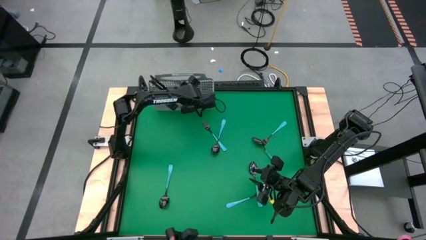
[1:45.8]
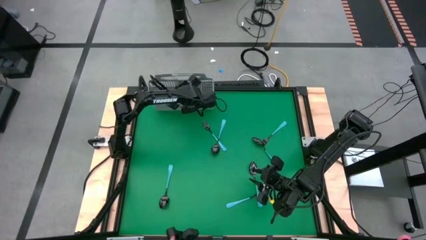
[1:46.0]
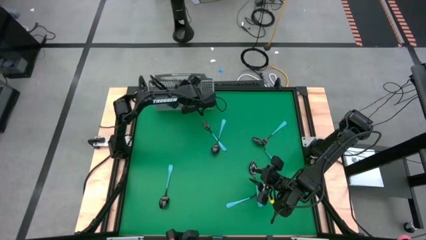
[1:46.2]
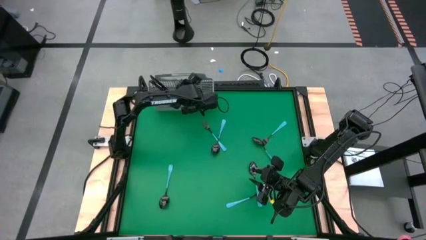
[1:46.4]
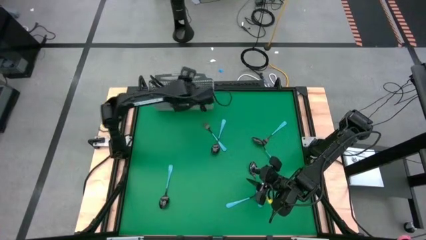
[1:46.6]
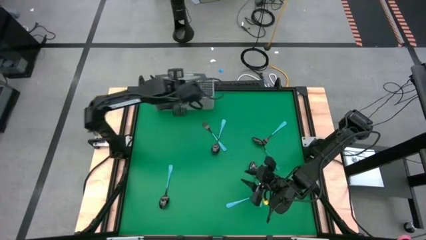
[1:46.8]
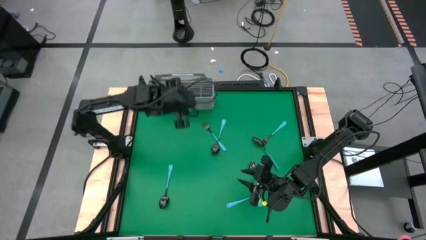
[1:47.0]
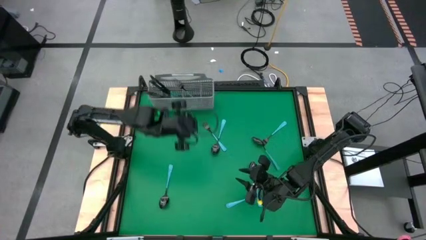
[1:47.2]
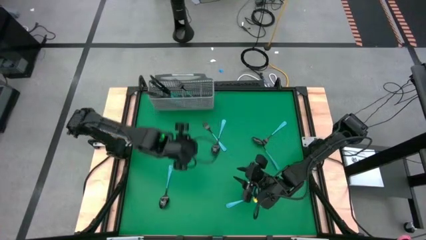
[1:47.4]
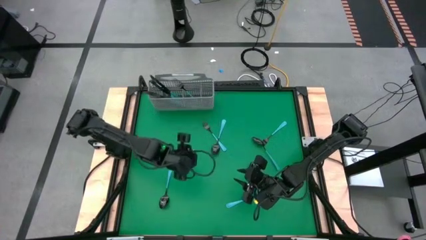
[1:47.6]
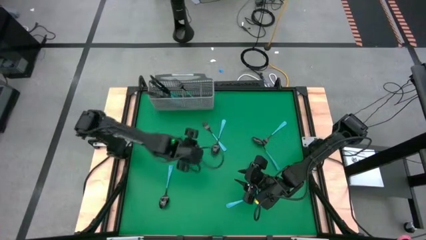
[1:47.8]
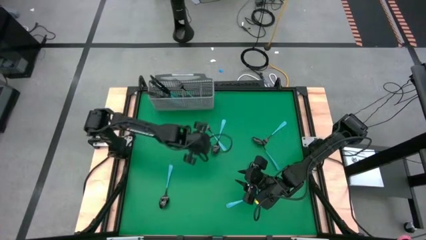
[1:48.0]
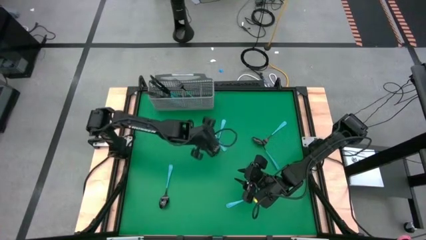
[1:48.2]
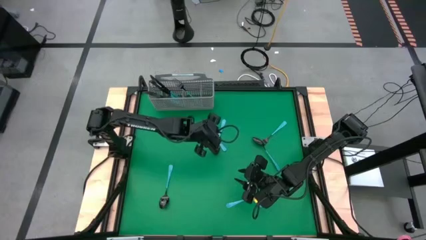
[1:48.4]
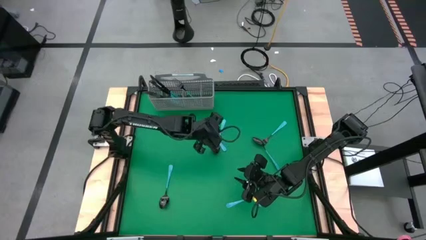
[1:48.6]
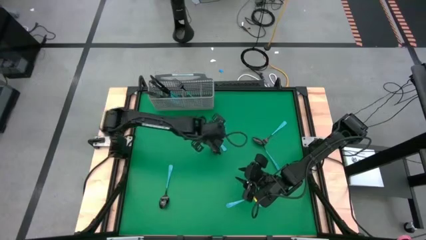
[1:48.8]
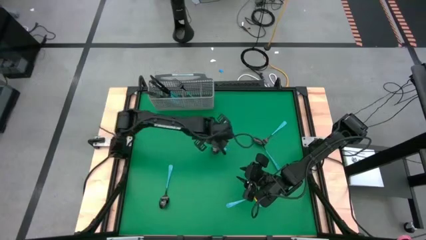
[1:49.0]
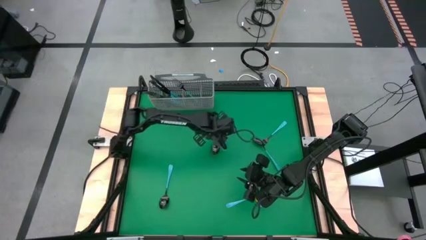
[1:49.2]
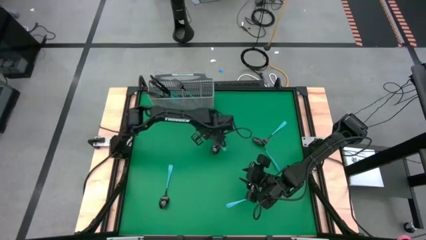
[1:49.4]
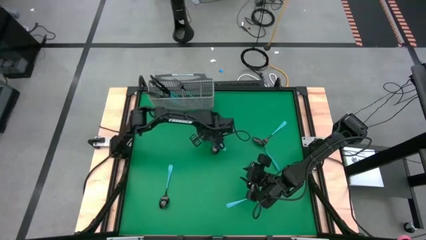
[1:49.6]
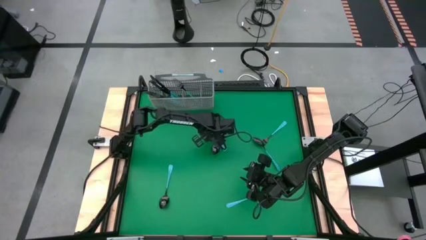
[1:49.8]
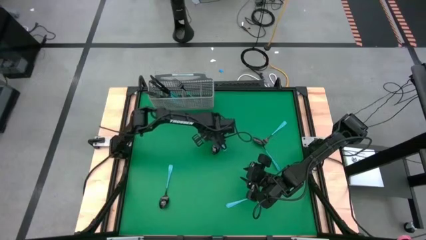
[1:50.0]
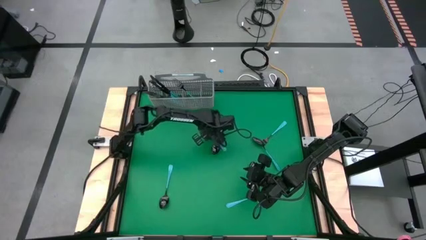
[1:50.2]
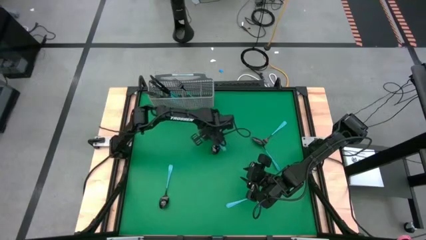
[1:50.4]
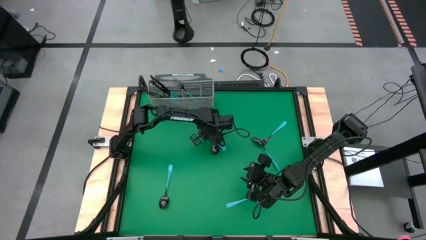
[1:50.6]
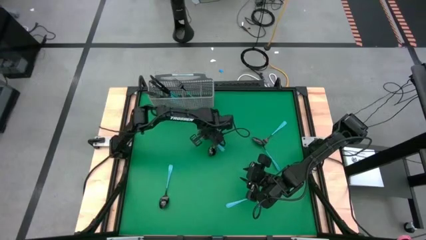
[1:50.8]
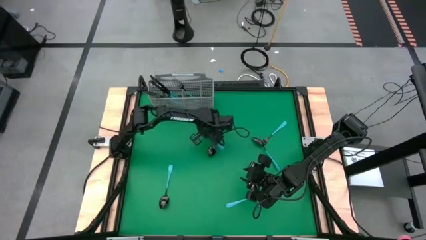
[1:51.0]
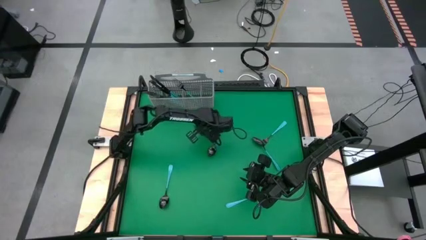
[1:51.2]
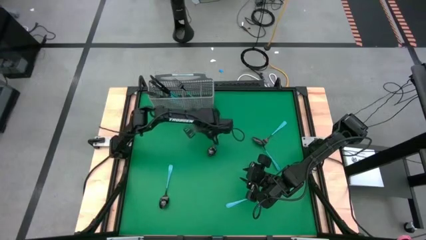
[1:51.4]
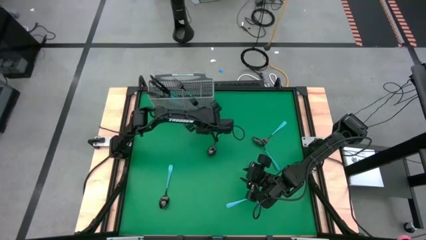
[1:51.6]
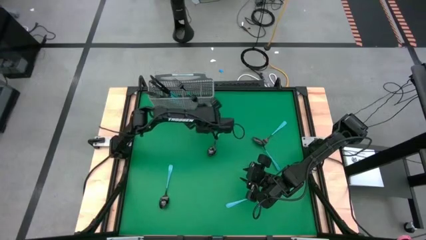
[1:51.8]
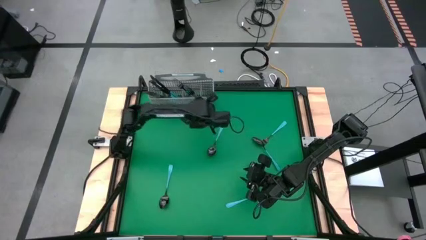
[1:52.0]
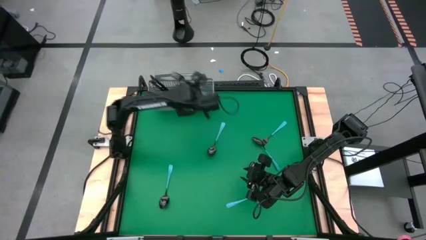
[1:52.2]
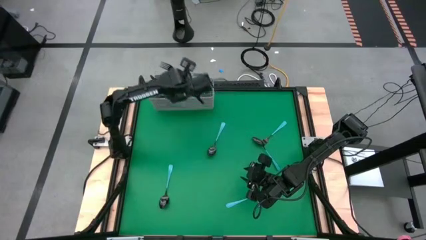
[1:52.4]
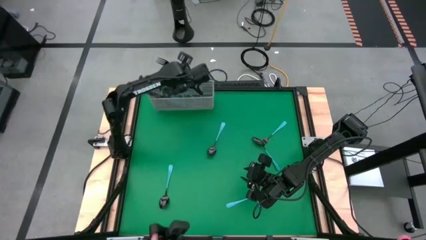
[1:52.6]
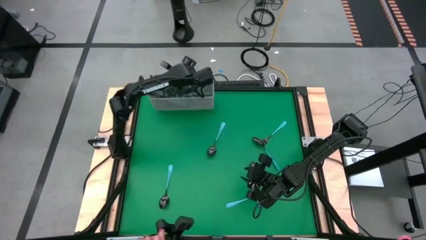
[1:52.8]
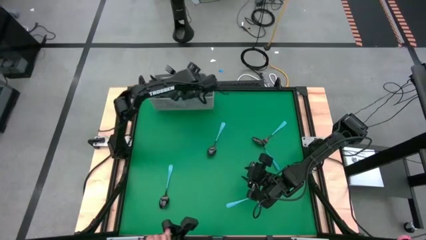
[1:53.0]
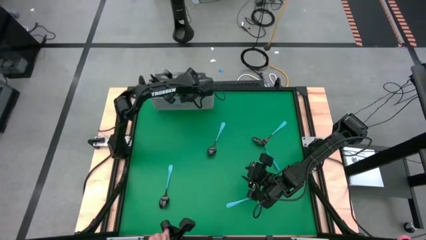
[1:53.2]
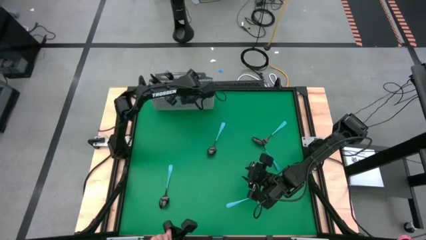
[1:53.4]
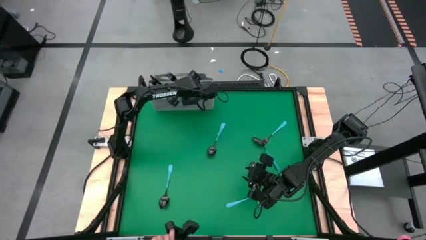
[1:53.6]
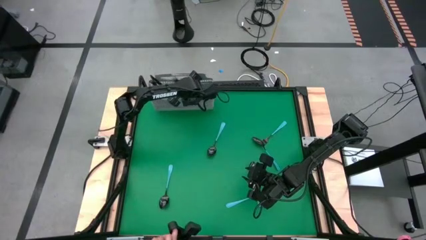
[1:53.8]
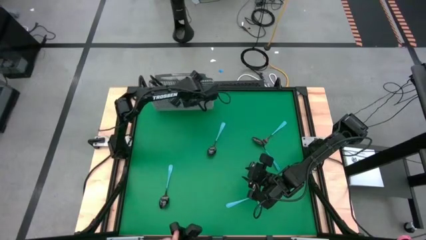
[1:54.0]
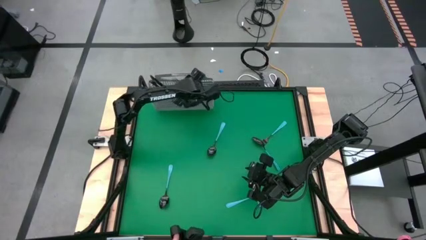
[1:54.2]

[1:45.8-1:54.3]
Task: Sort silverware
Put the fork into the silverware rack

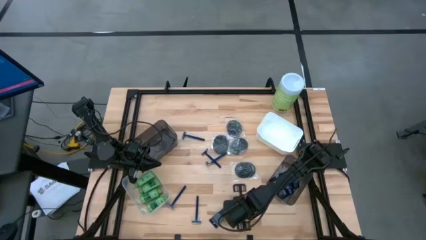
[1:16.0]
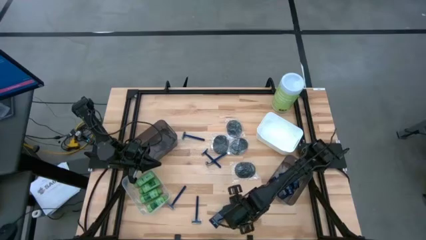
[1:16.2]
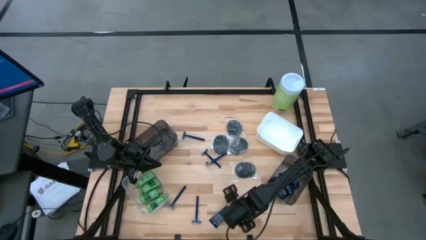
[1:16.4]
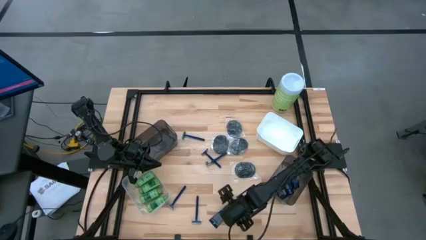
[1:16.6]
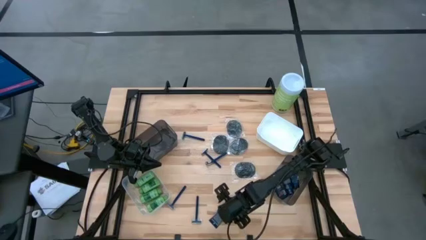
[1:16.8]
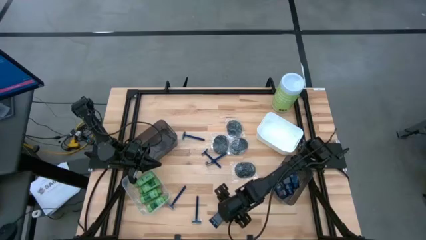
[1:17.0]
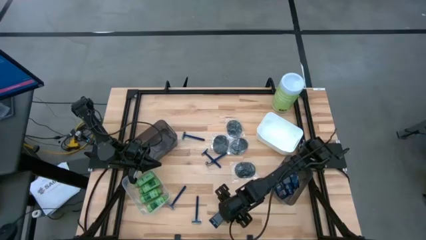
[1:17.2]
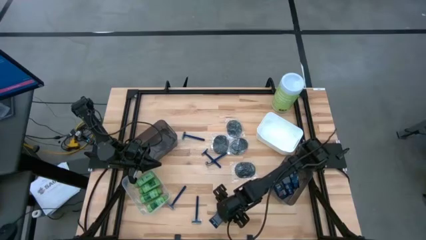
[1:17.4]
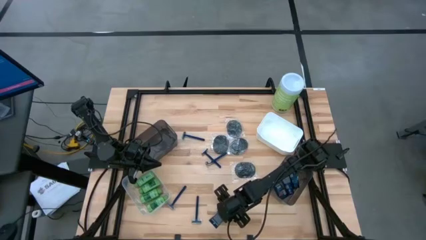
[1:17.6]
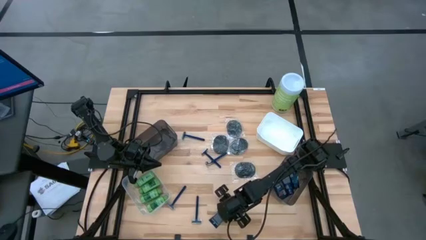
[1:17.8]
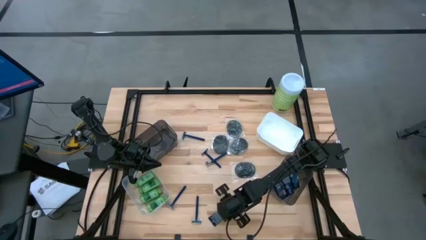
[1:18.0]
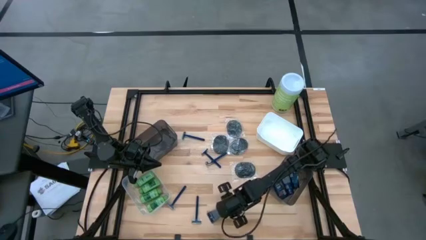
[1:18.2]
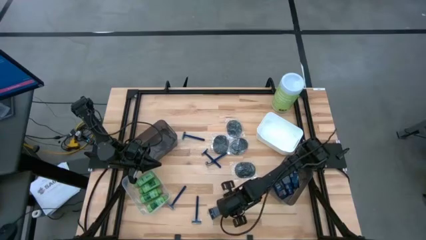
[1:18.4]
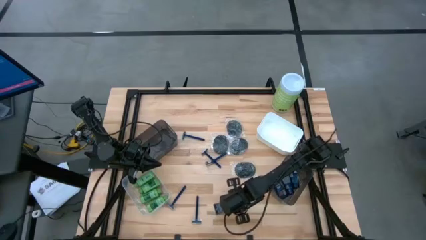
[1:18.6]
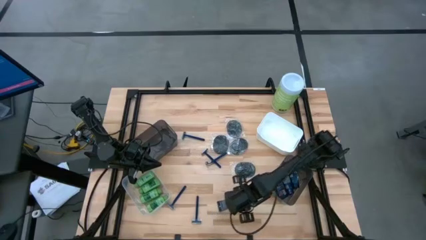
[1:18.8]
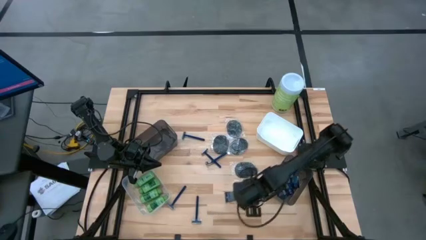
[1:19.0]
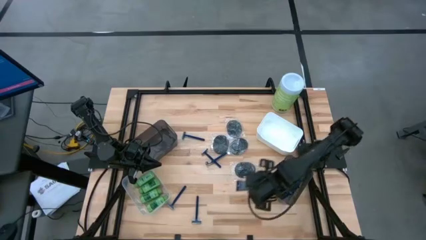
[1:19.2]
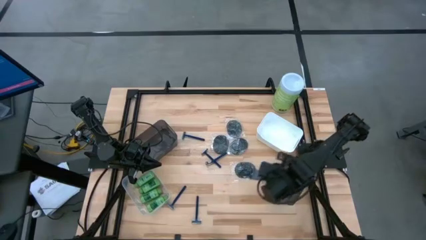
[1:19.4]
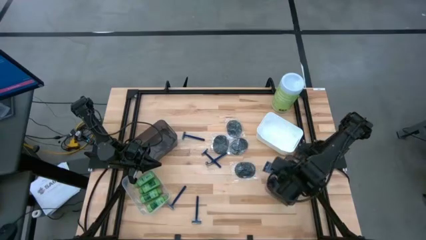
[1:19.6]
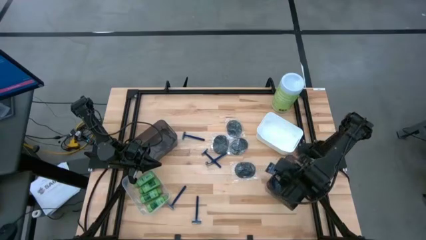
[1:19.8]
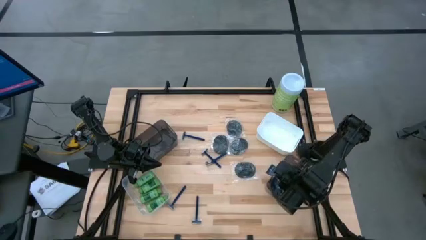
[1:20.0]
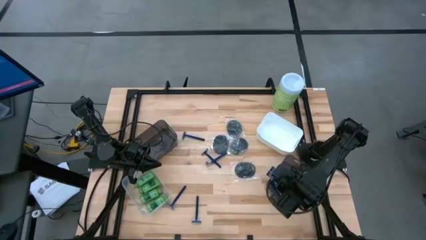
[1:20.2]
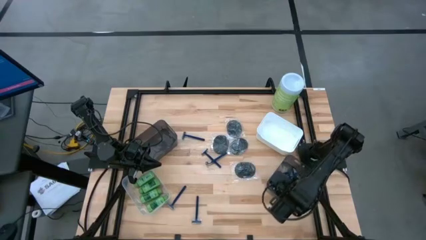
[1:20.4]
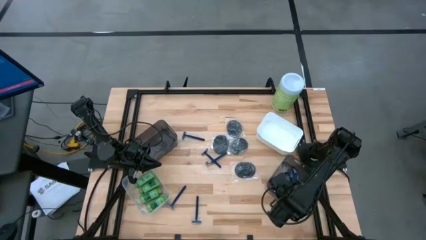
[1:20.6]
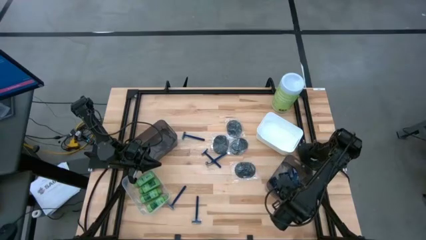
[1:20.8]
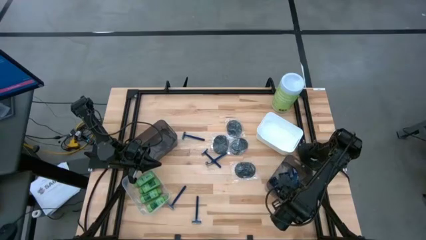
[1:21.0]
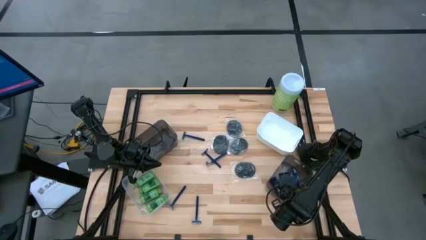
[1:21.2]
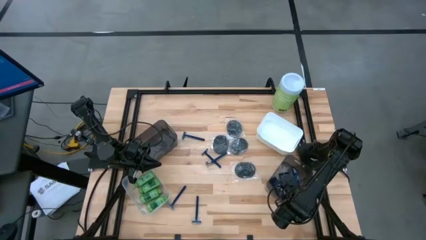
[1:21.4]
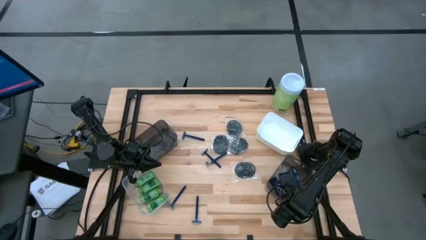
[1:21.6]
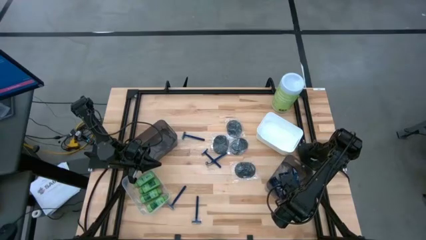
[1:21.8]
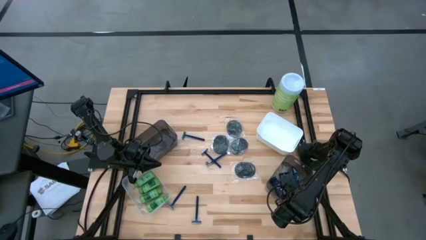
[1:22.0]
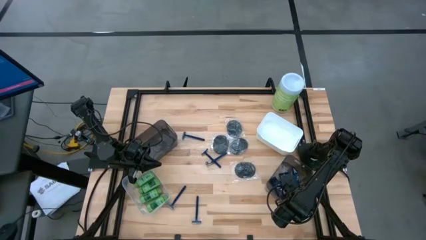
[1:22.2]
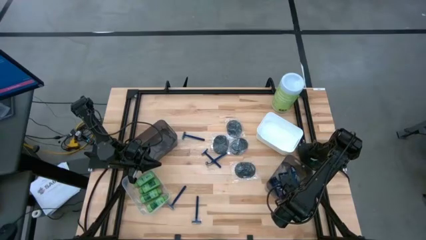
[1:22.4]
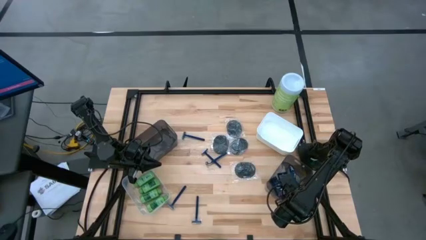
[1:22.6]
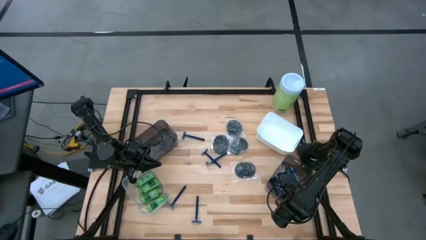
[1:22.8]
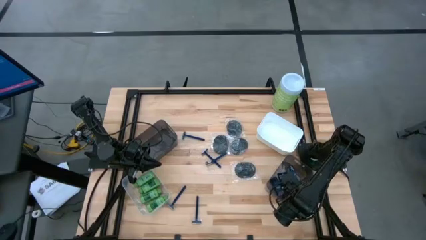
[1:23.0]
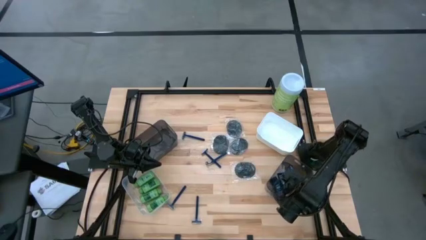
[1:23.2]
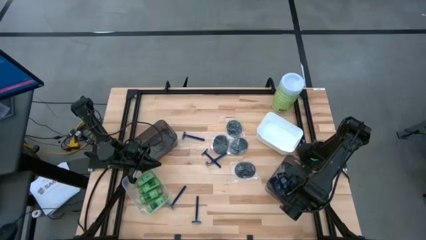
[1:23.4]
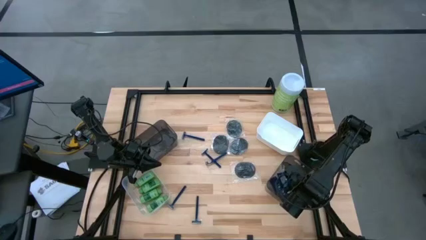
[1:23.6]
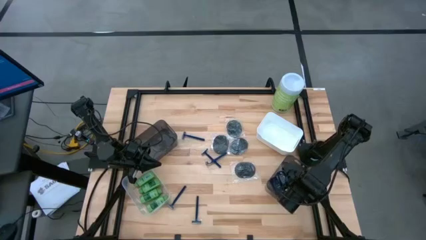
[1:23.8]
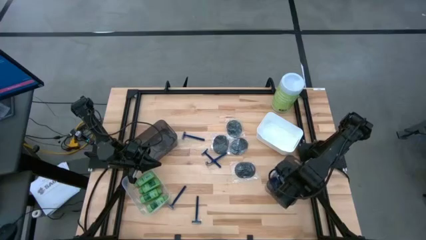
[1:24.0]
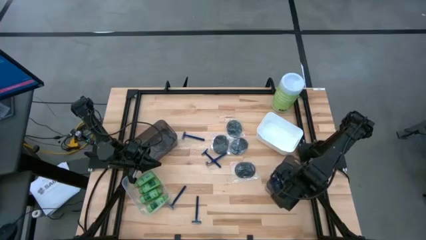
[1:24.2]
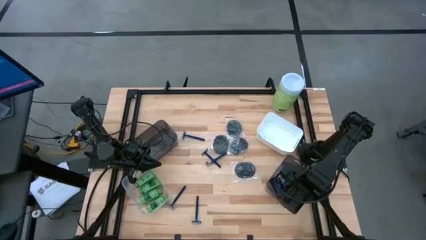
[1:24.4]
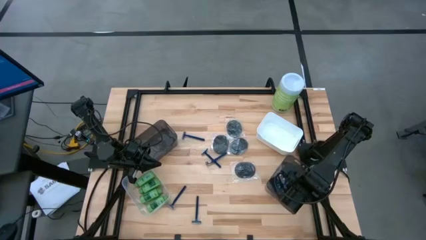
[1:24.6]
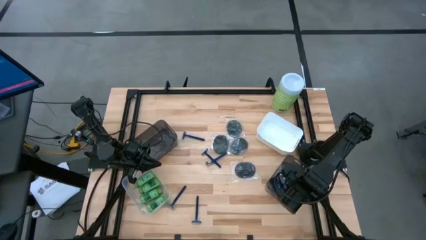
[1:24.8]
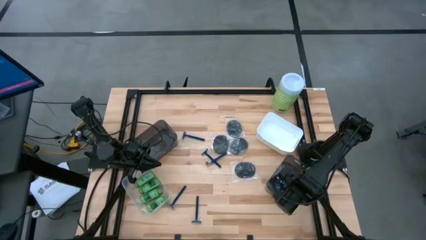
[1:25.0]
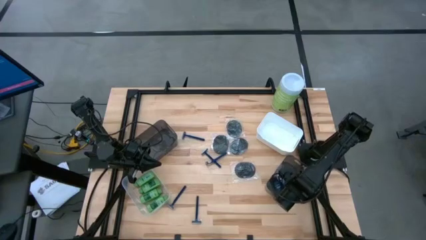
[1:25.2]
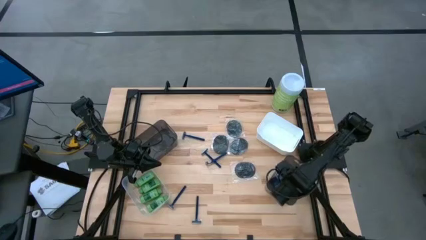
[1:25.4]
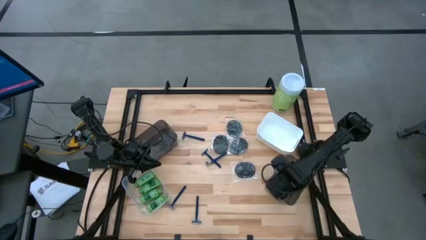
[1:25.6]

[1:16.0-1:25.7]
Task: Pick & Place Travel size toiletries
Put the blue shave cream into the right black bin
